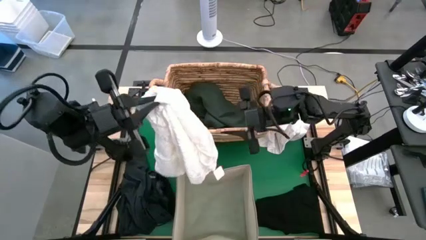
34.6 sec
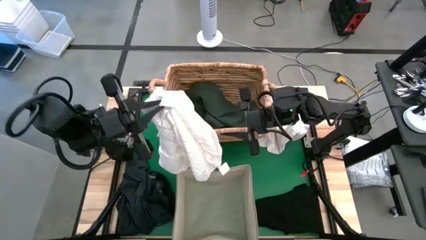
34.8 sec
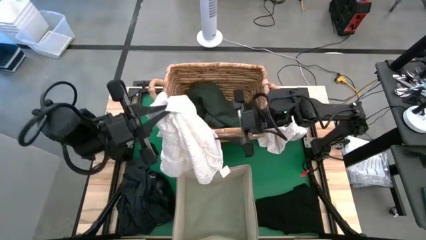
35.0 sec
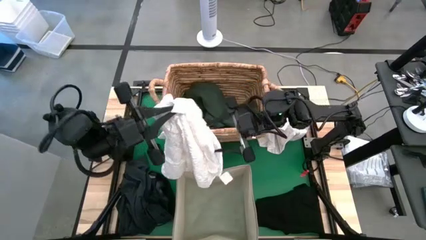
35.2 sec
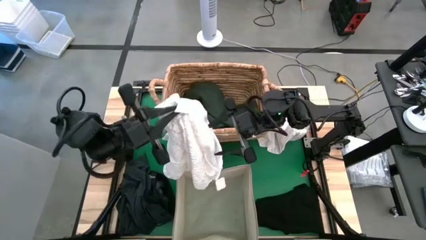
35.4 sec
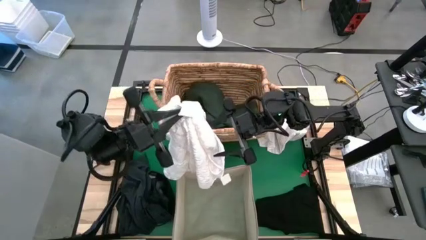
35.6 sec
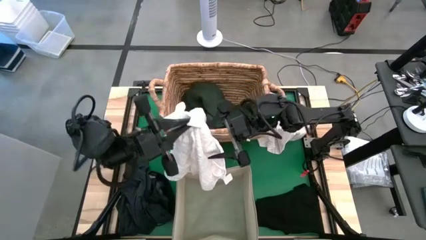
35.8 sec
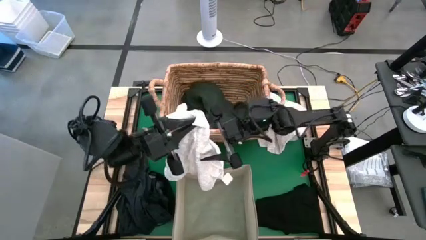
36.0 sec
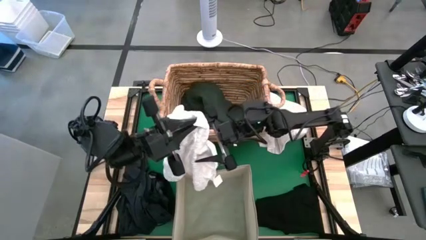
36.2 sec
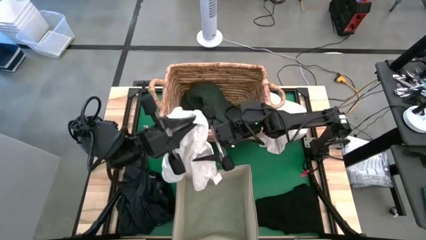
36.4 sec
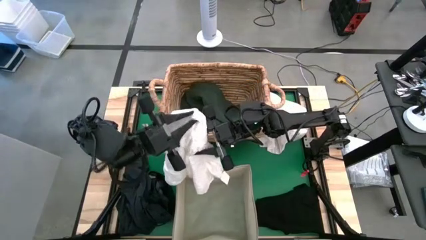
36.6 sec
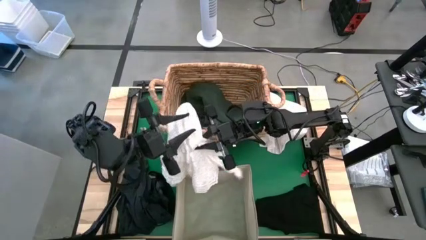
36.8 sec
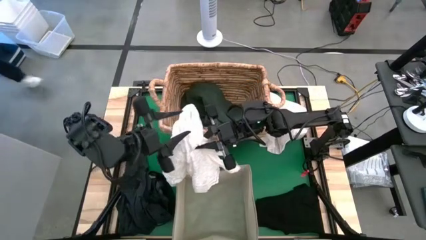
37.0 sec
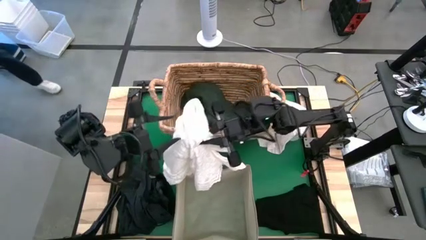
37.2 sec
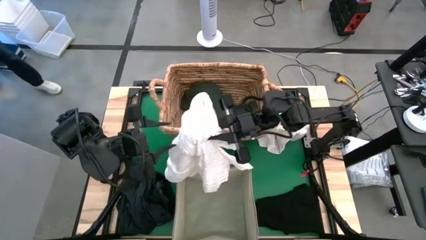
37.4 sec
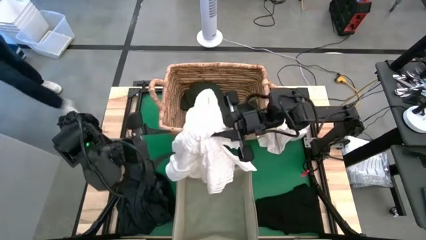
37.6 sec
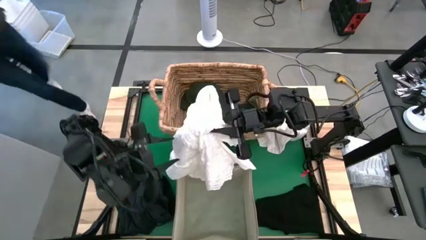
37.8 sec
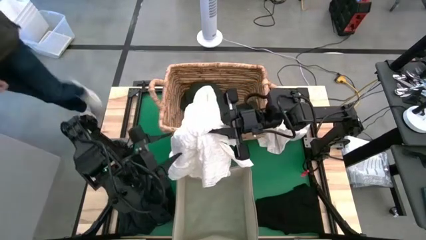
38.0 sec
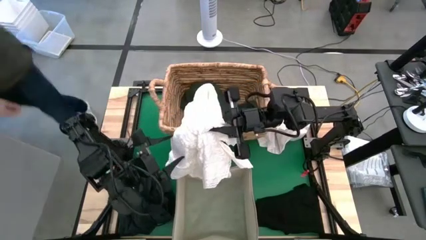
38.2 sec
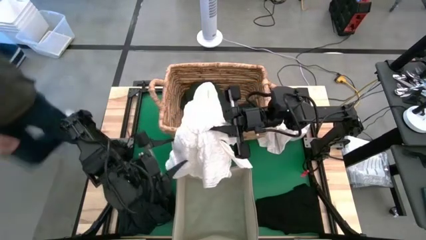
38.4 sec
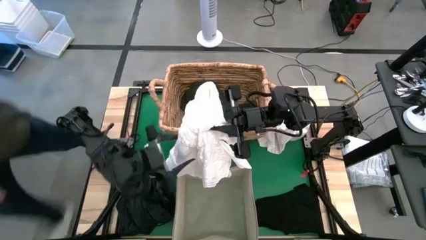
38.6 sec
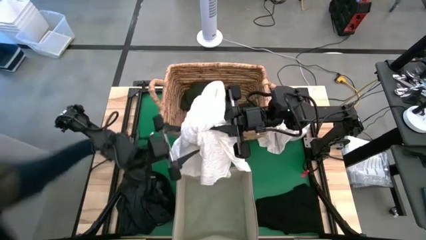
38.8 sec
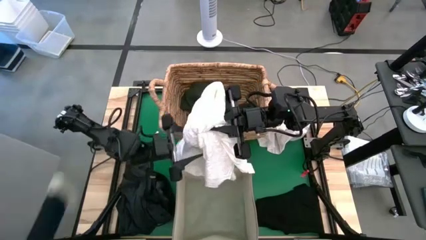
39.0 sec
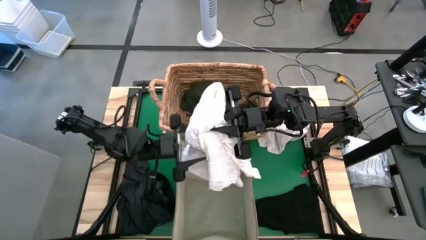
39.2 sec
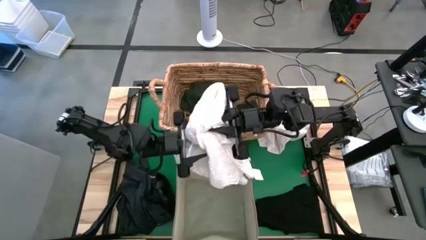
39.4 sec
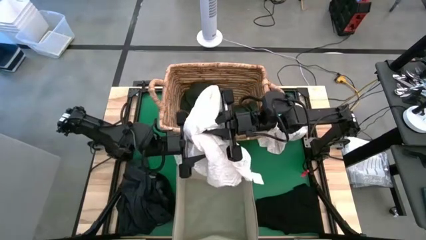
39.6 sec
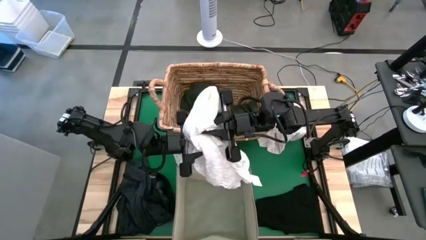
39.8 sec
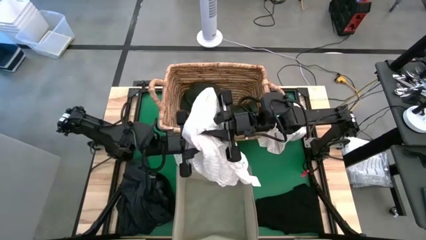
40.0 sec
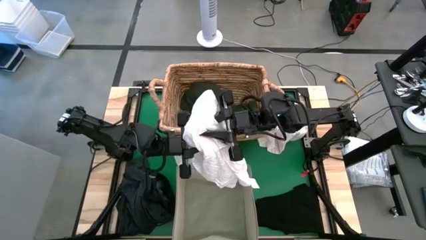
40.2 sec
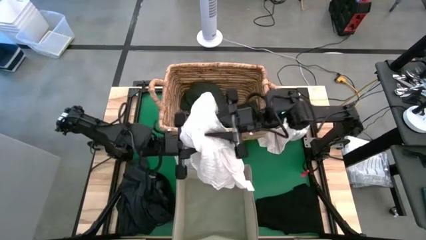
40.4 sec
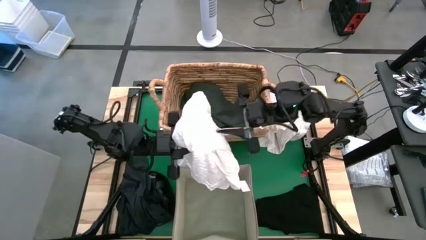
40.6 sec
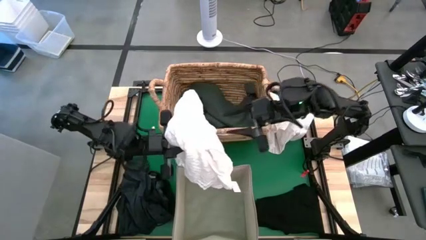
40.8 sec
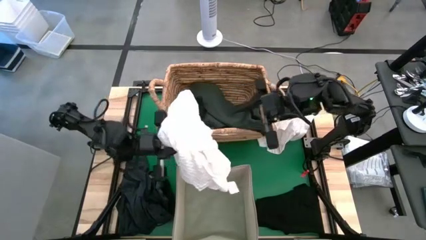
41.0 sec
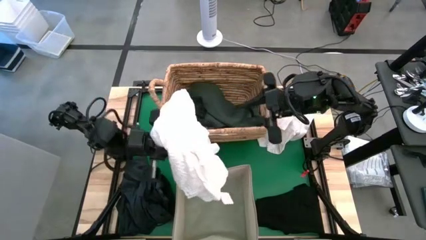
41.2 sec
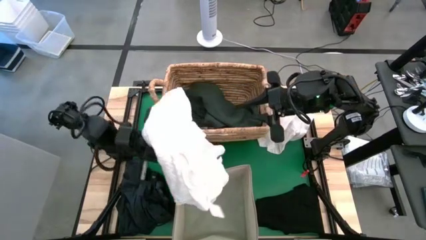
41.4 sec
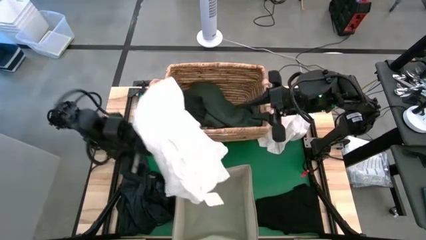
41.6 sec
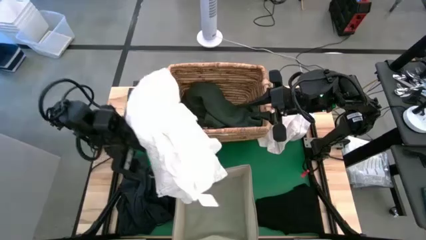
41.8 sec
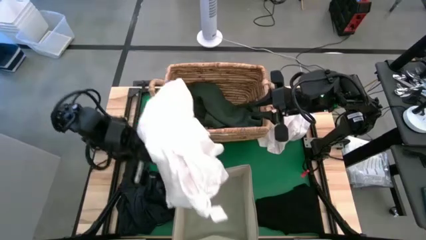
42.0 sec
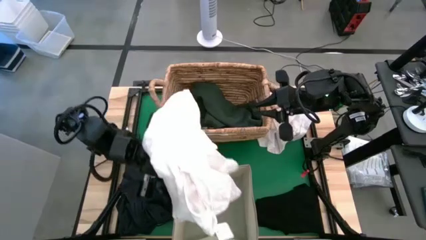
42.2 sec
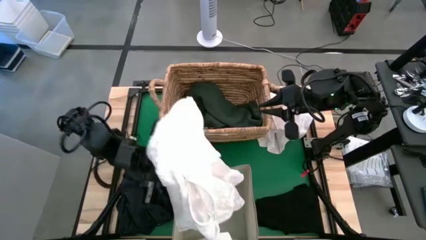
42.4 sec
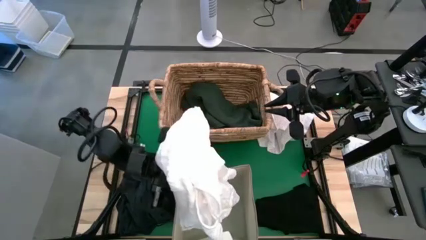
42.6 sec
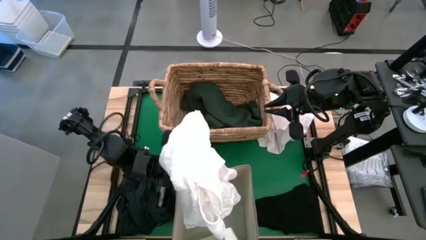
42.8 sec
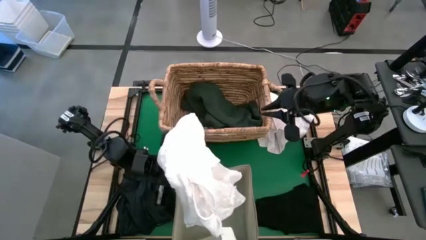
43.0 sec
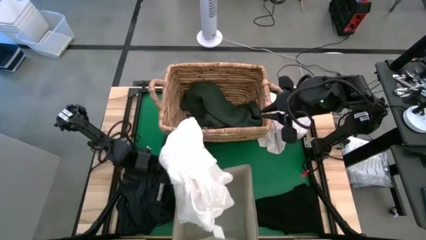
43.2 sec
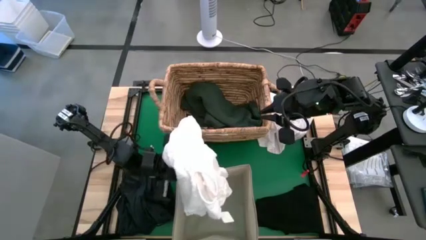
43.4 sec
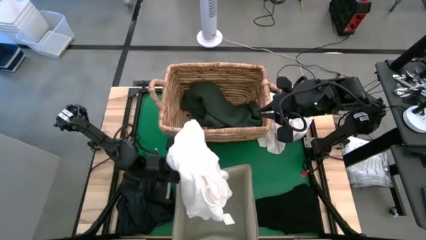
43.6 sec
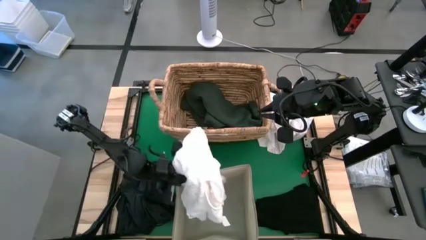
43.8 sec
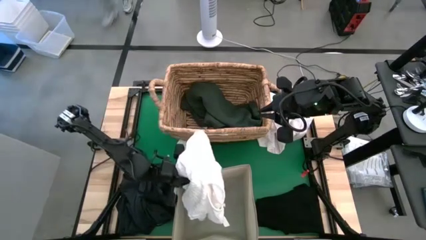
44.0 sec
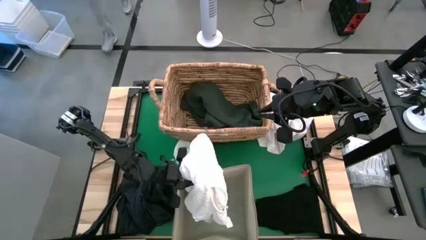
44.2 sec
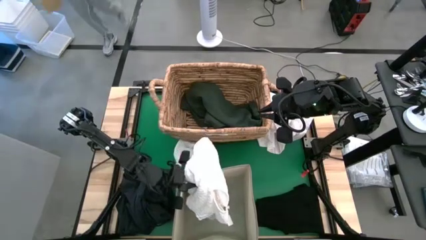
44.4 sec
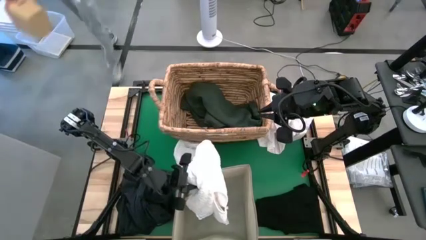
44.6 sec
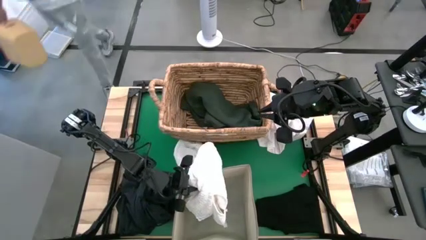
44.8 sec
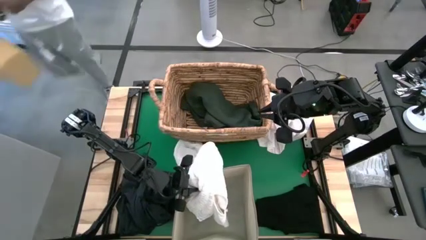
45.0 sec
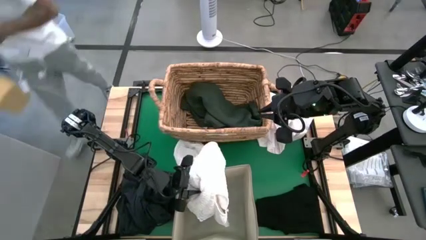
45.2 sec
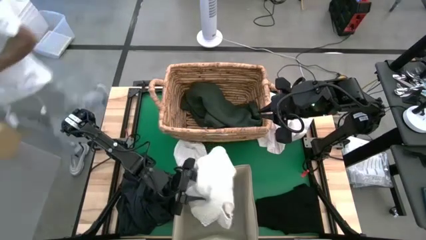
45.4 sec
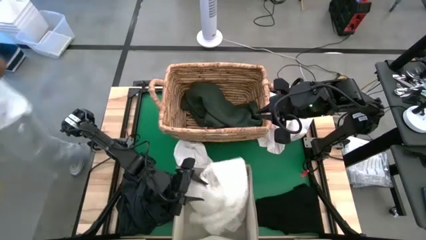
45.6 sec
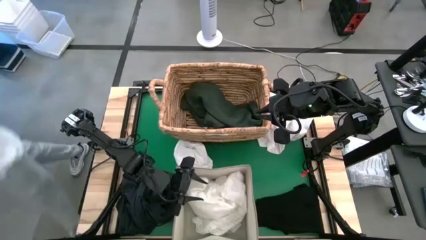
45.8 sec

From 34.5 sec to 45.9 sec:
Put the white shirt into the white laundry organizer

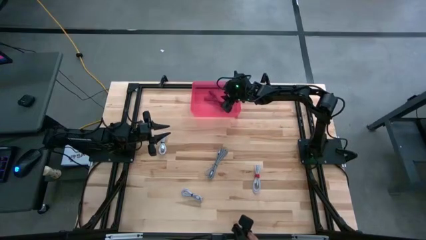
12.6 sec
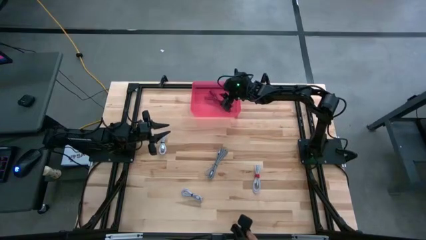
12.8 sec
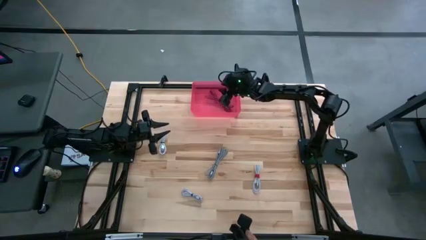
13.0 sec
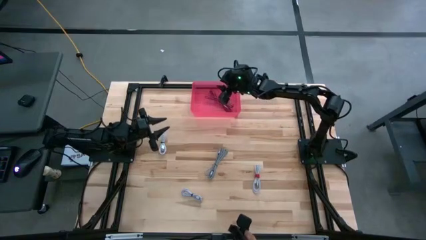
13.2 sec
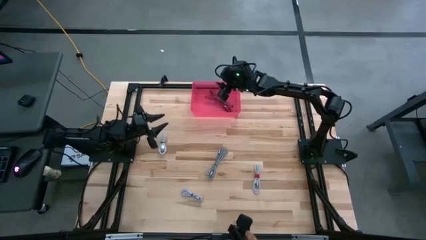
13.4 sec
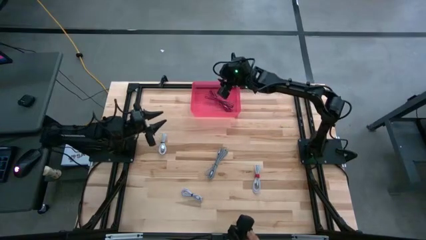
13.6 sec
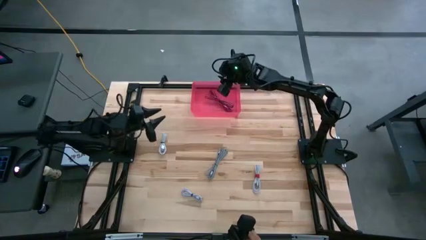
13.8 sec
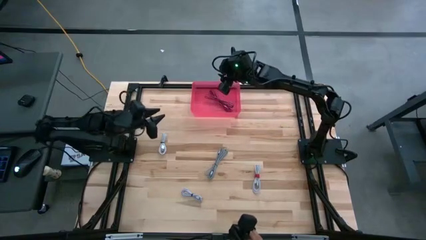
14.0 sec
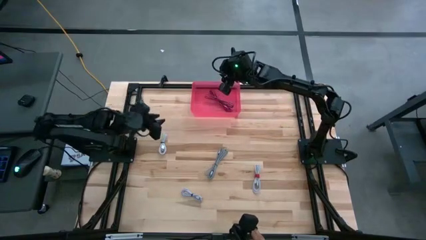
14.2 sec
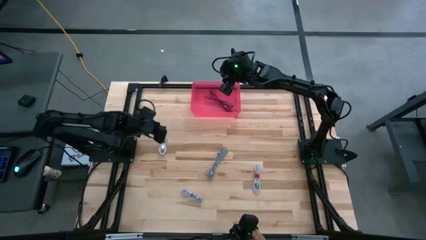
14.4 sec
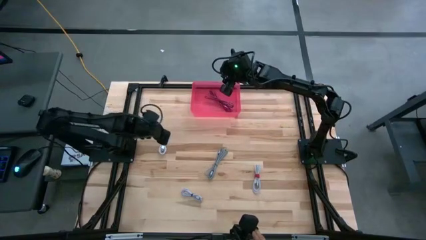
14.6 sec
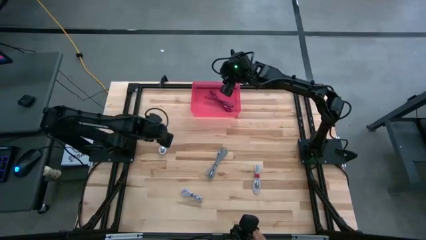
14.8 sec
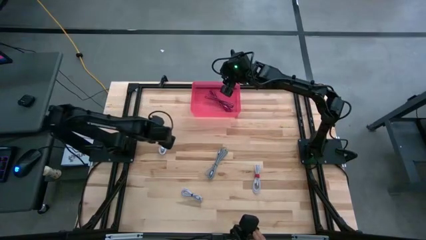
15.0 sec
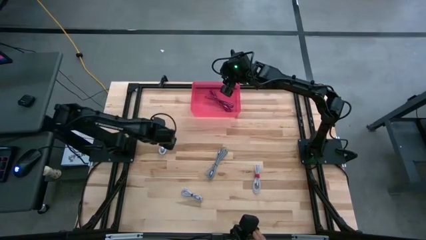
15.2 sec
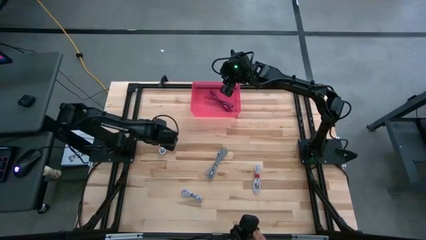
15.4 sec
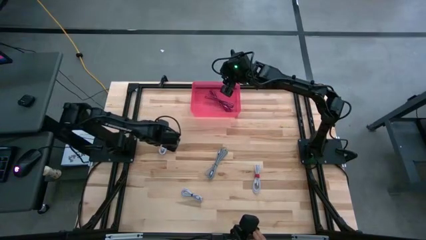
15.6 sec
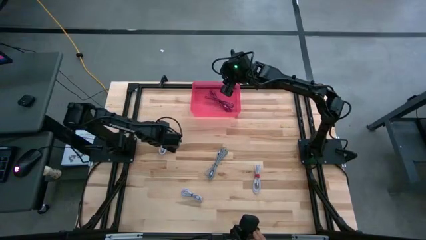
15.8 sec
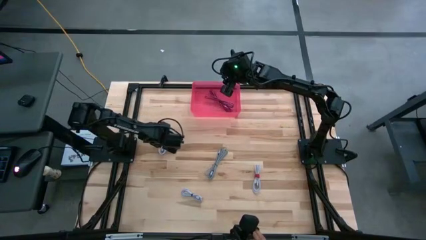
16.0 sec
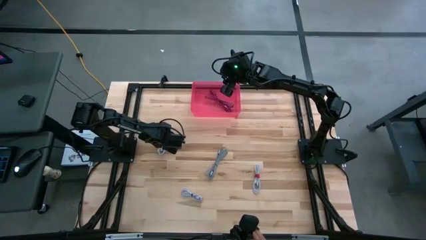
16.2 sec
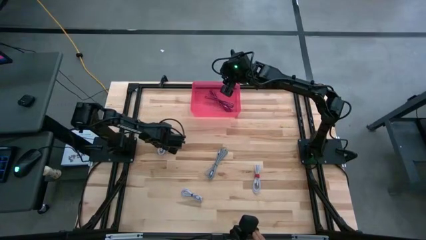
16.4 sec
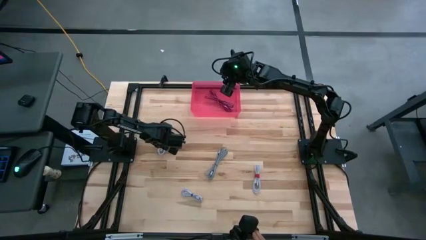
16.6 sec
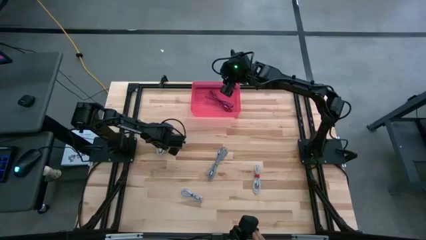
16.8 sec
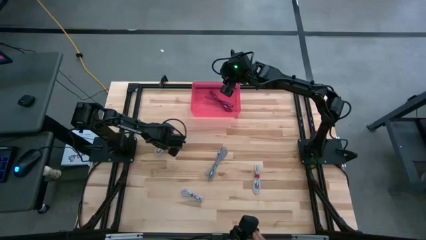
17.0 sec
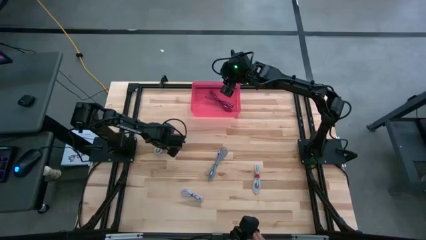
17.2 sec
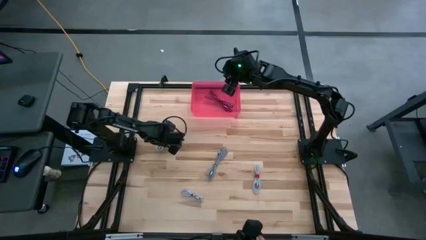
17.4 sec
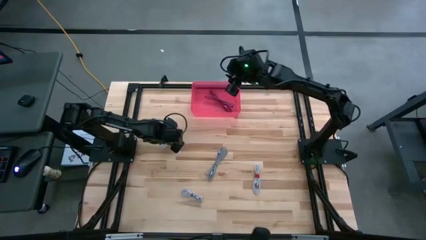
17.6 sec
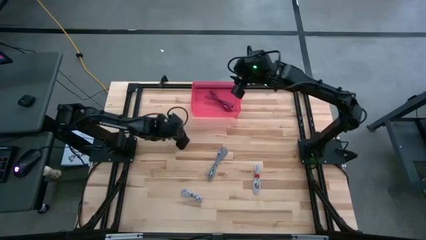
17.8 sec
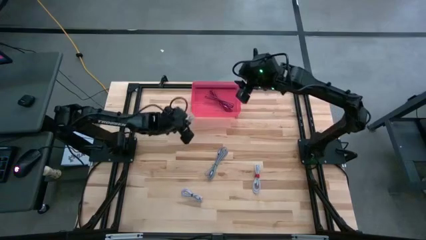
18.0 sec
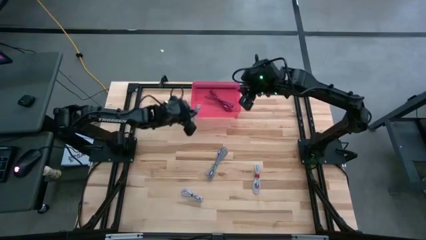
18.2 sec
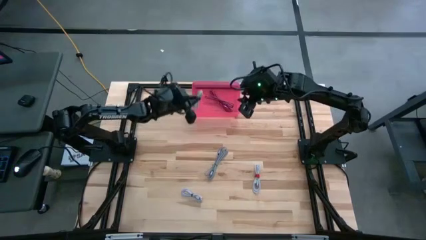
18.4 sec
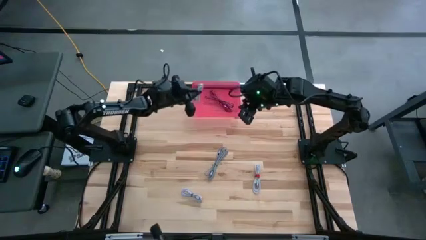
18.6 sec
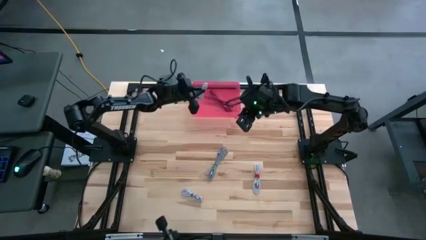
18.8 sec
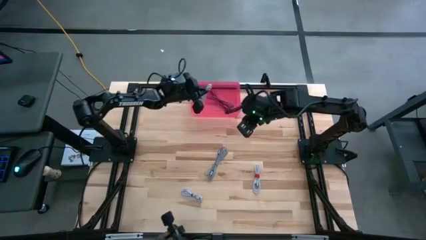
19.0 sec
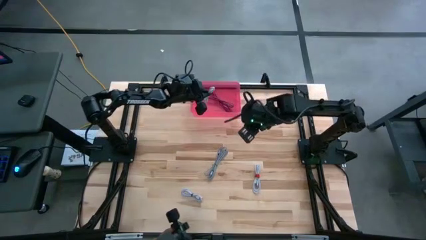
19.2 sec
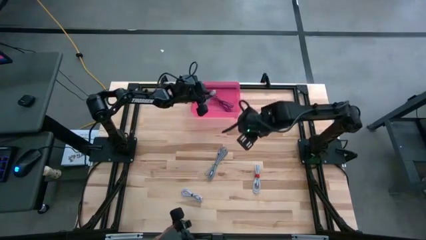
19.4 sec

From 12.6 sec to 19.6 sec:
Put the top left white charger into the pink bin
